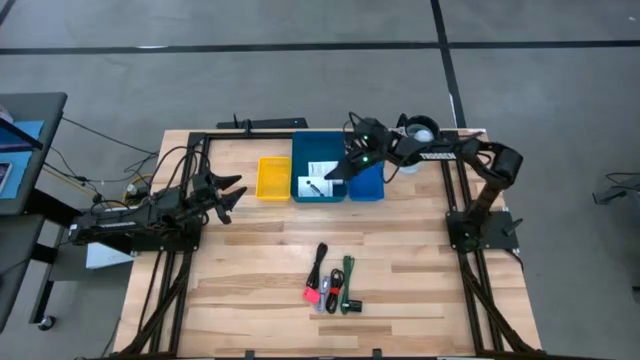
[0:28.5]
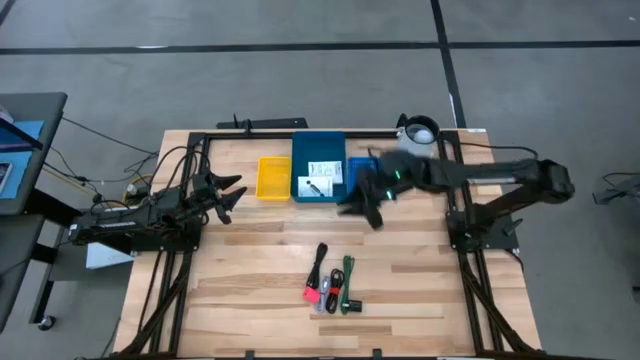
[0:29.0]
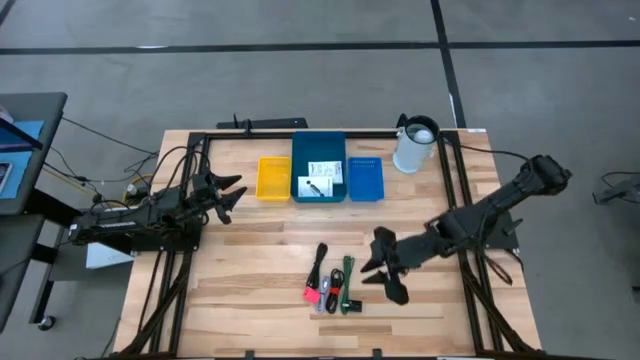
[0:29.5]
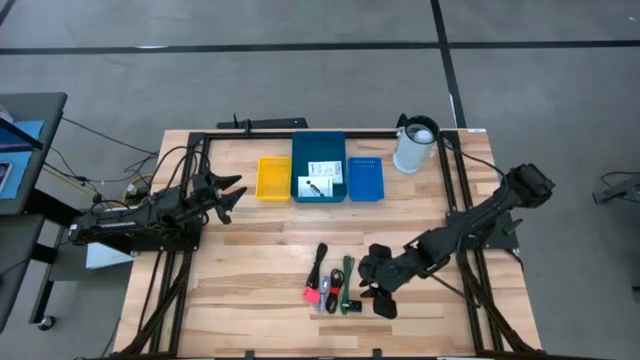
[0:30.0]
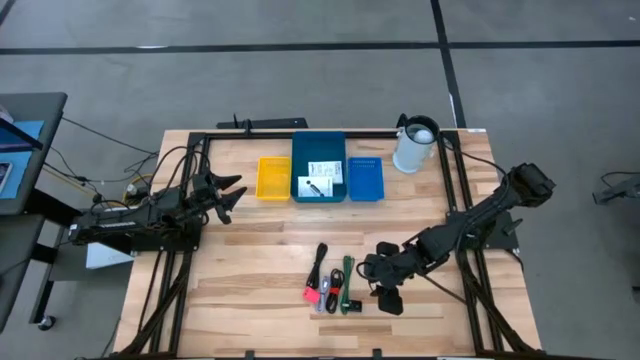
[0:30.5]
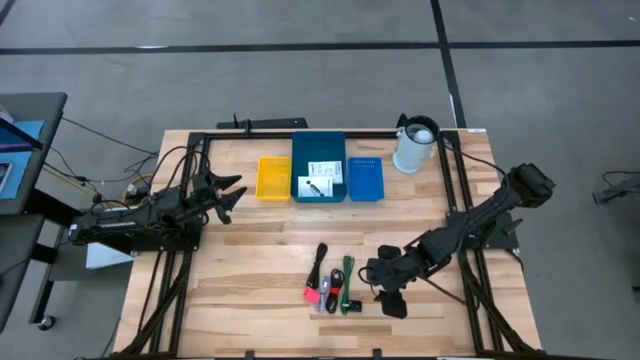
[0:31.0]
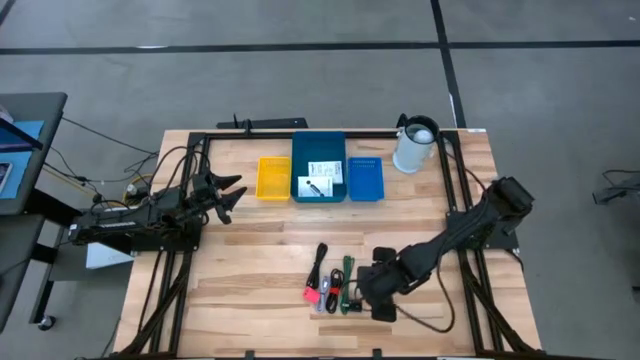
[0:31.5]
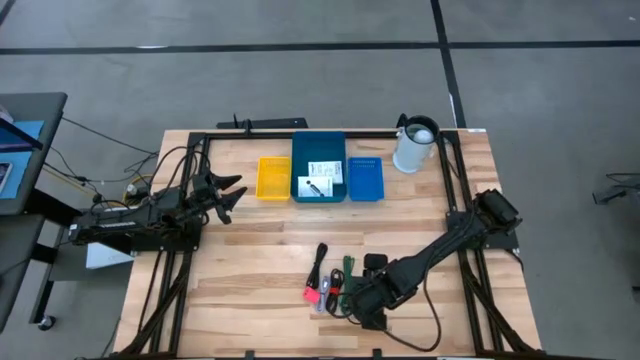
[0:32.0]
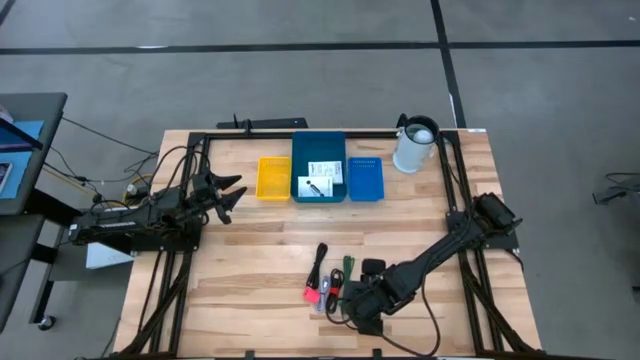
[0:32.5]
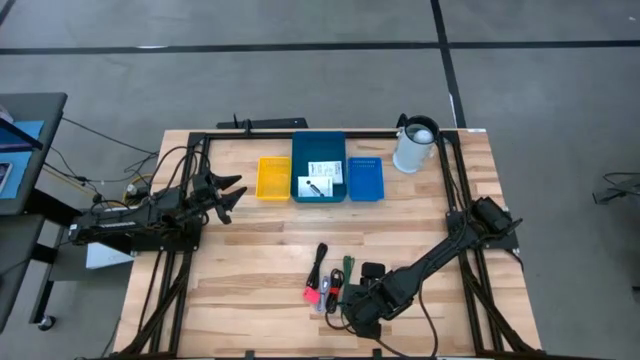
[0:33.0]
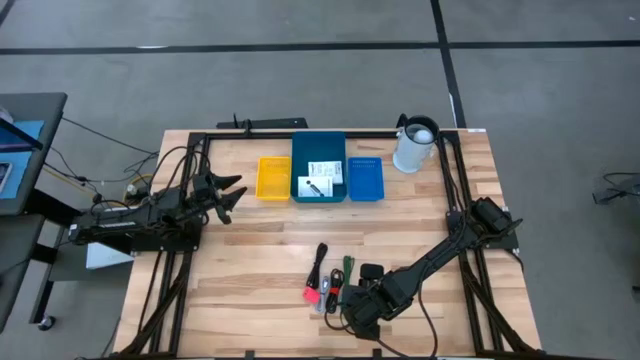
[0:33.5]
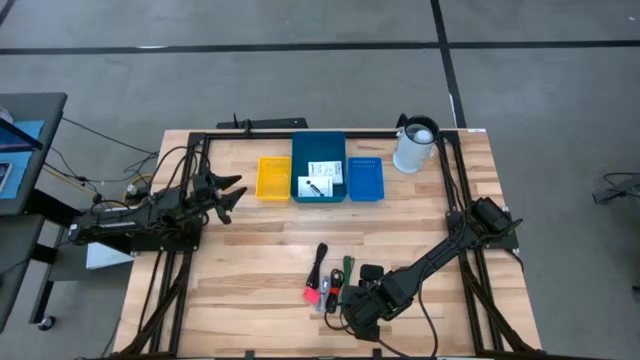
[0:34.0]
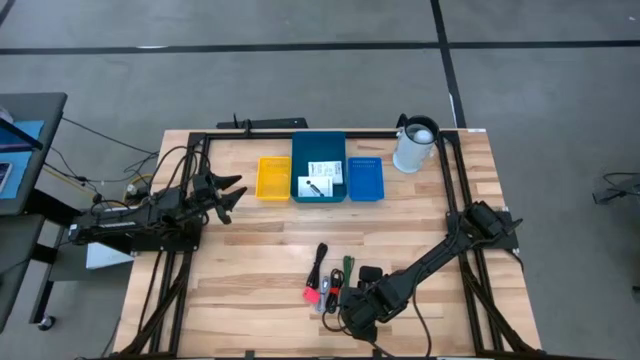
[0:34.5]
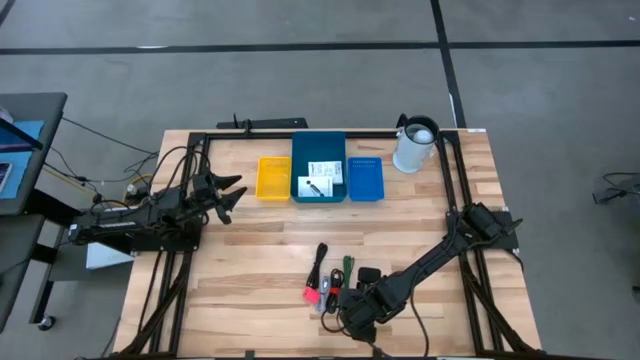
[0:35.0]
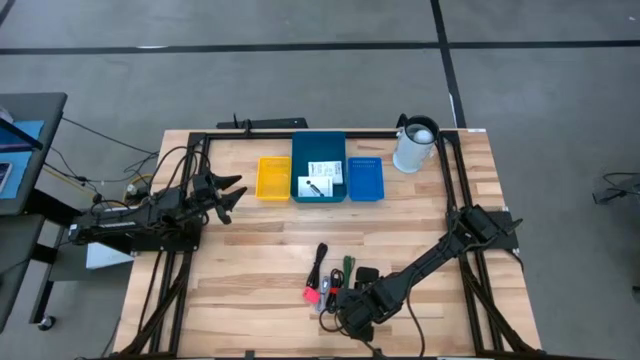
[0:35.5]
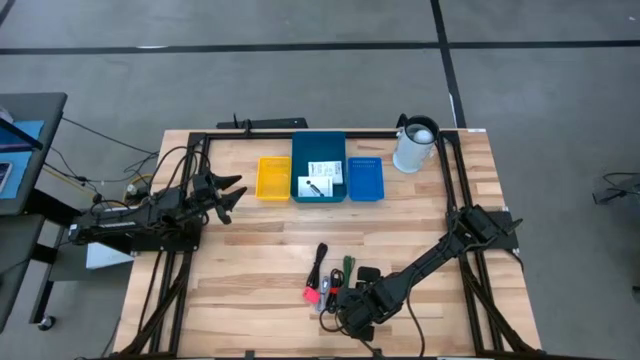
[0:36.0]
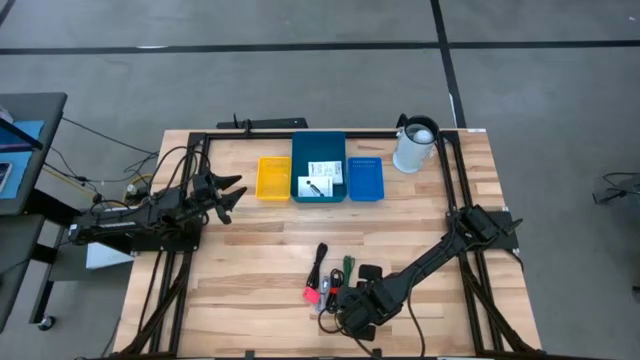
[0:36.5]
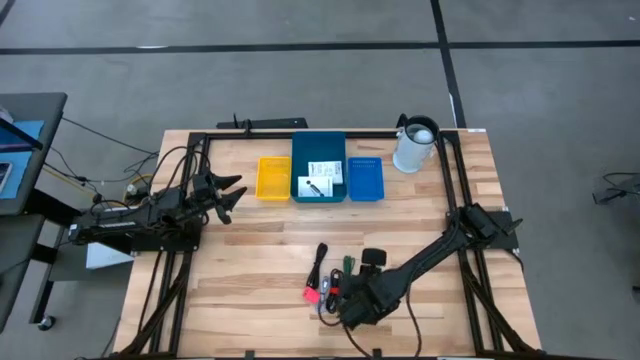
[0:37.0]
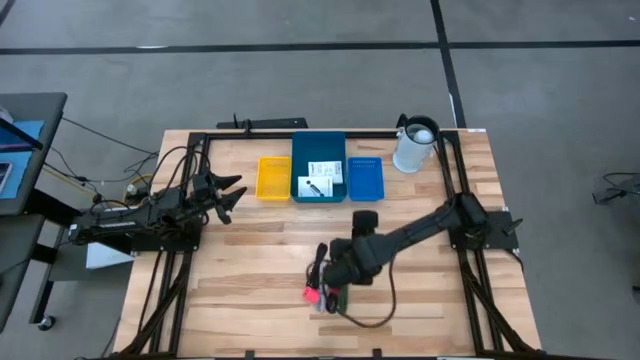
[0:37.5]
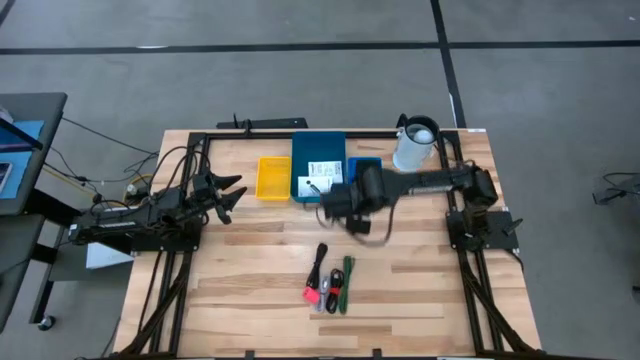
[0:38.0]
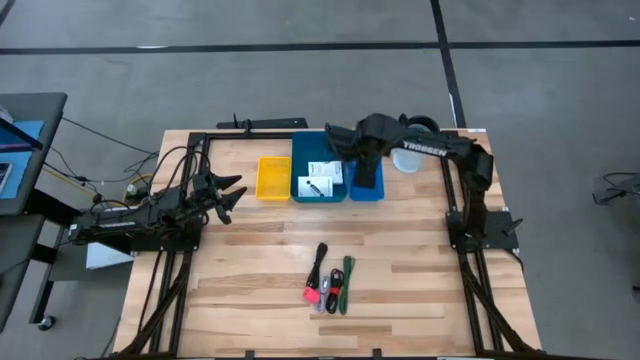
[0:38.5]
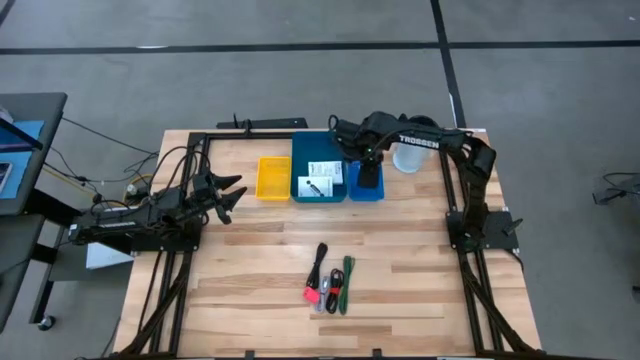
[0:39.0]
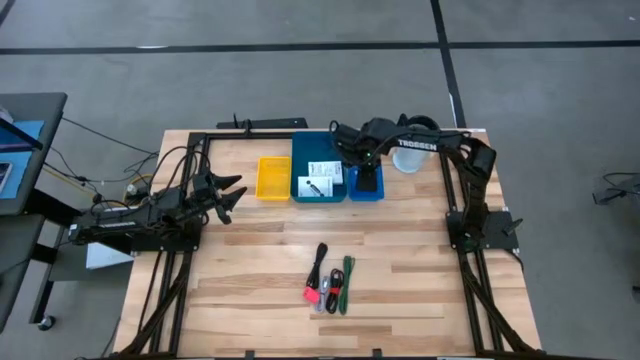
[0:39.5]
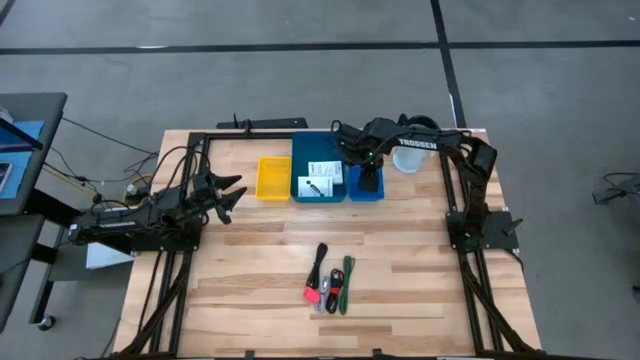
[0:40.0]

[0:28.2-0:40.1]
Task: Pick and place items into bin
Put the black charger adapter into the blue bin

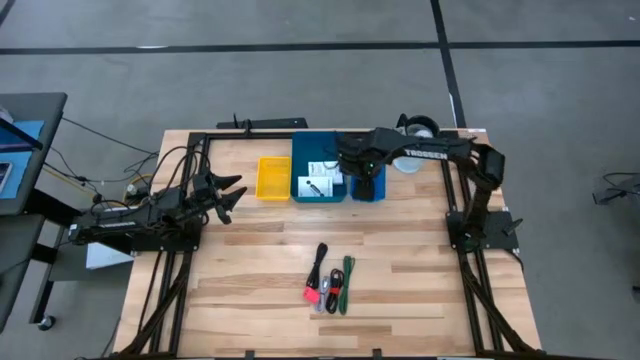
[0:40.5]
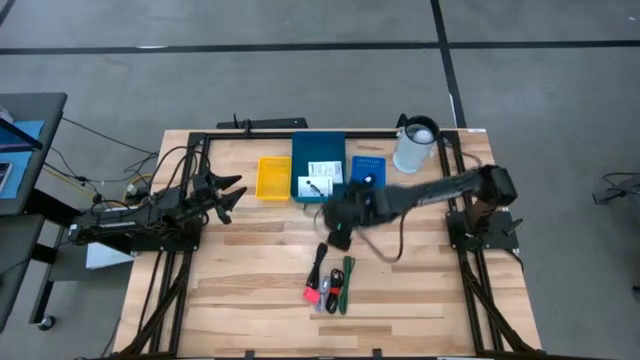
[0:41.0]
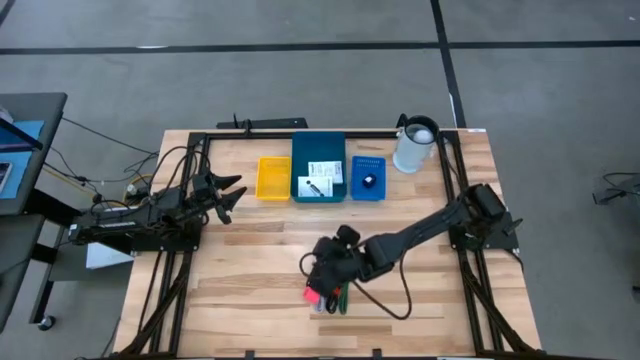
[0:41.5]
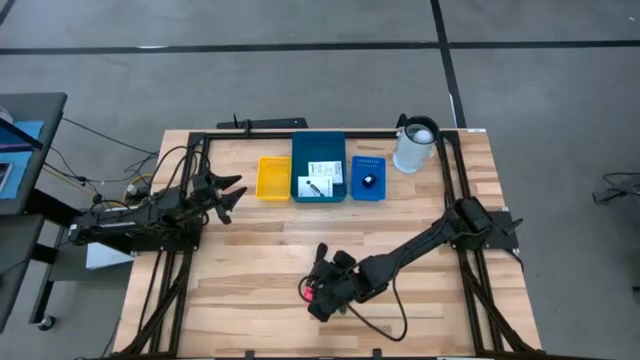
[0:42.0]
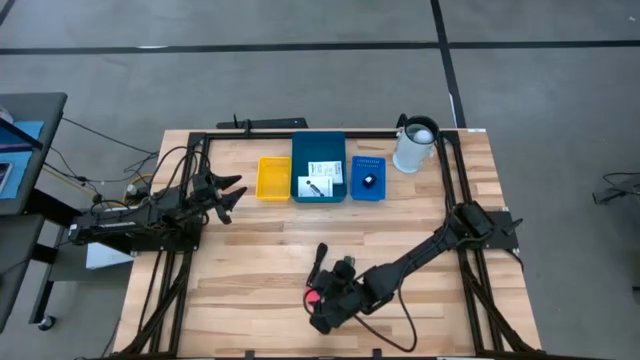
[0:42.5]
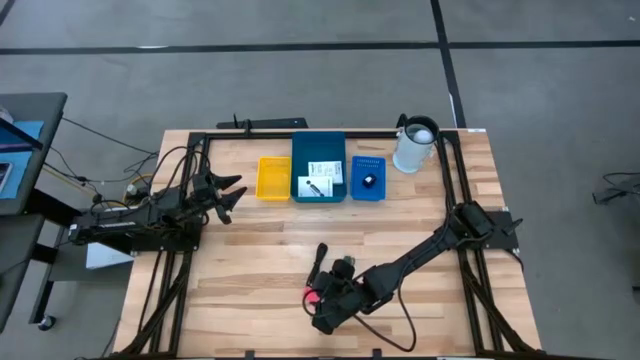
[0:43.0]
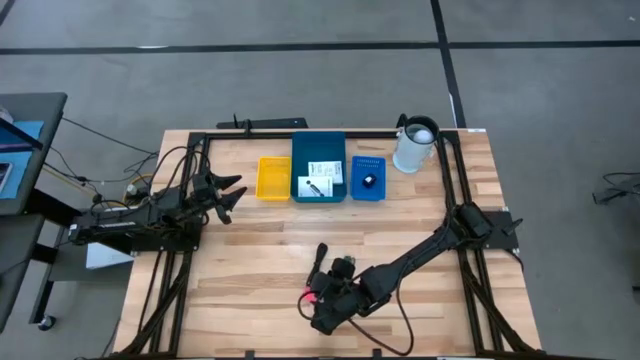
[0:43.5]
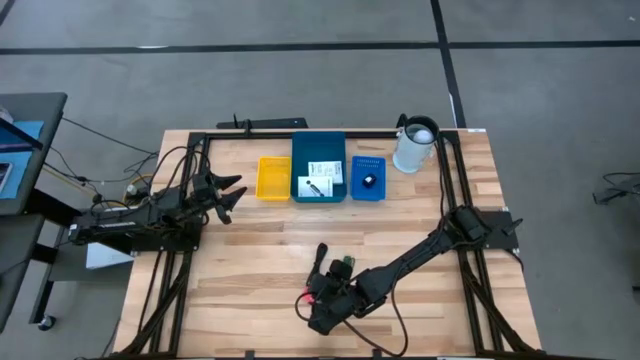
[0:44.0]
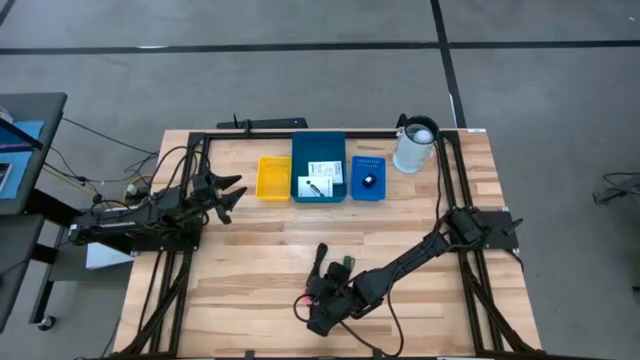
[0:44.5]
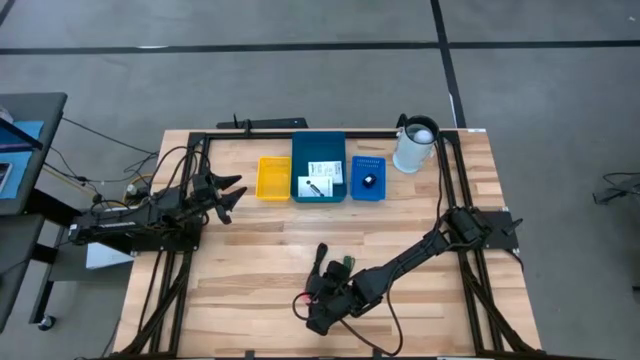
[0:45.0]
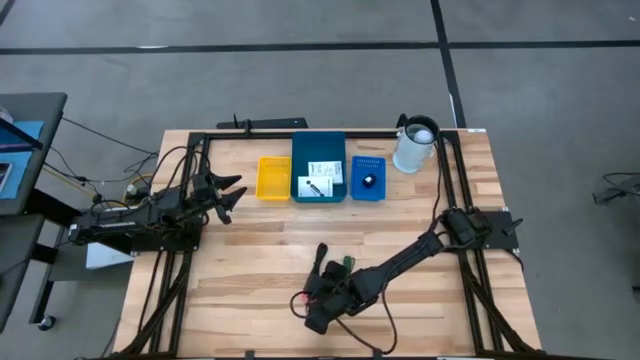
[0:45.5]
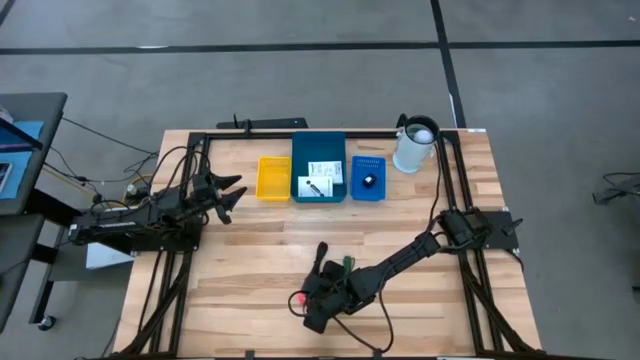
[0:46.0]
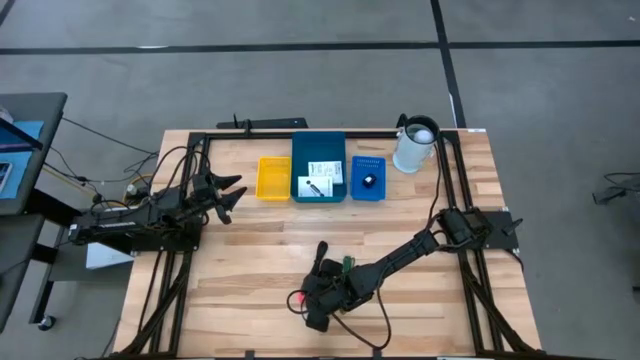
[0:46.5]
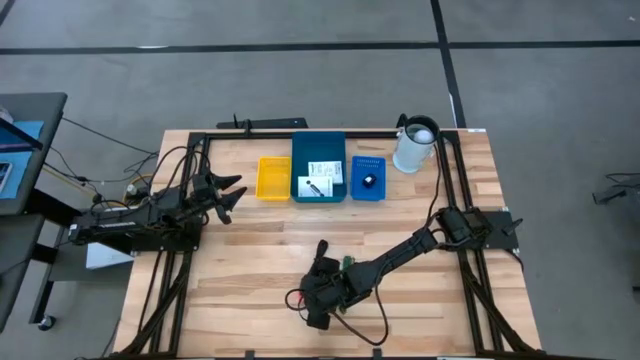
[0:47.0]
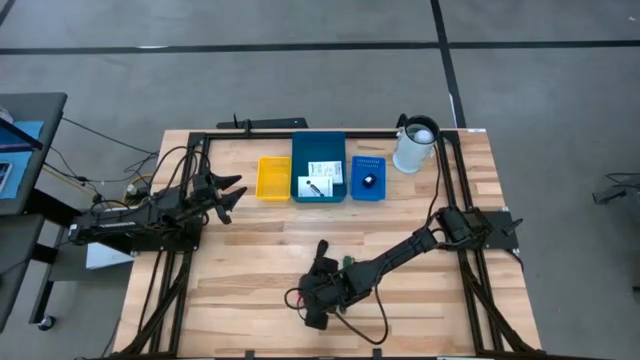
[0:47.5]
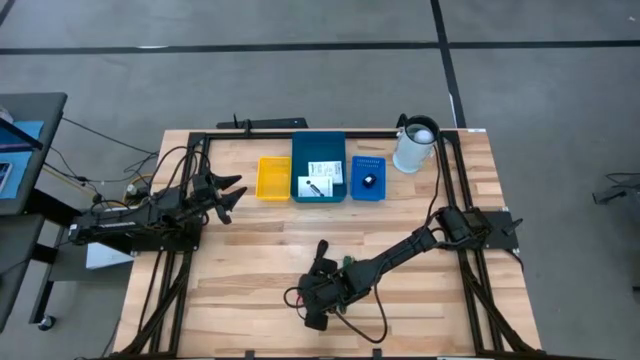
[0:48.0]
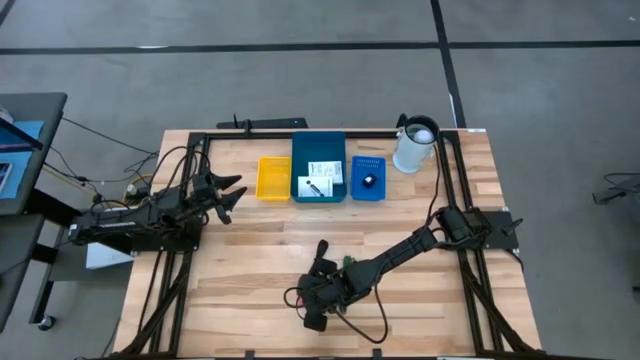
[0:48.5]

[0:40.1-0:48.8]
Put the pink charger adapter into the blue bin

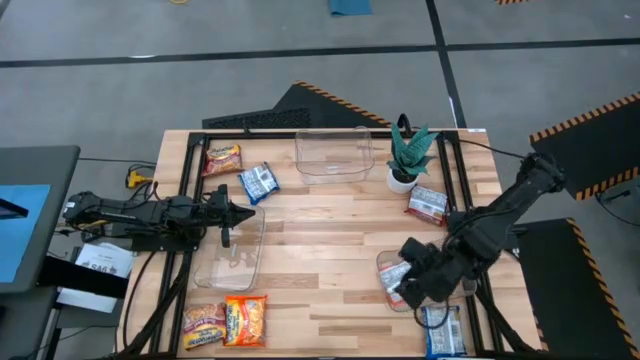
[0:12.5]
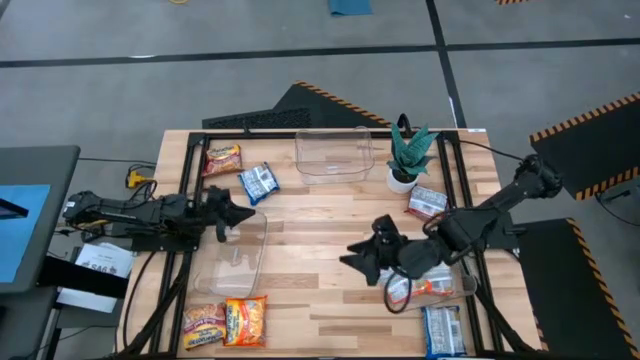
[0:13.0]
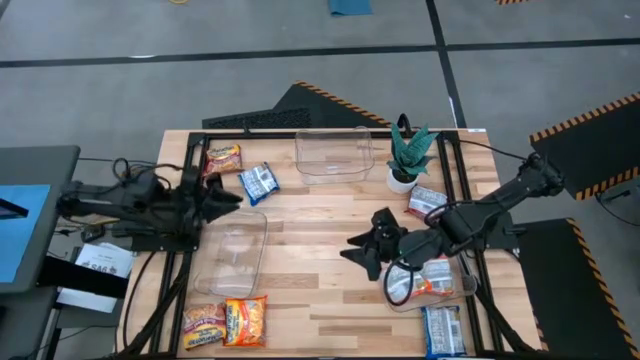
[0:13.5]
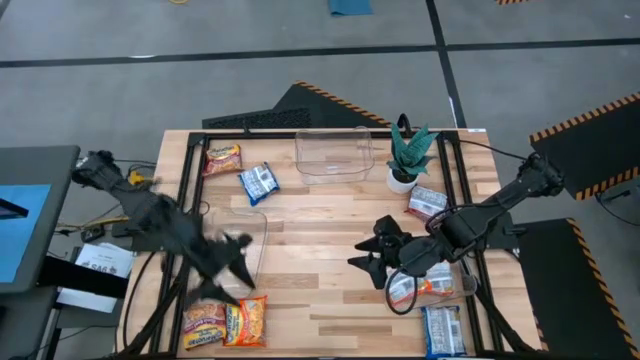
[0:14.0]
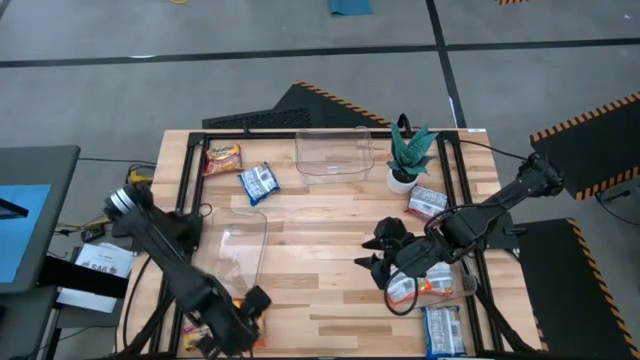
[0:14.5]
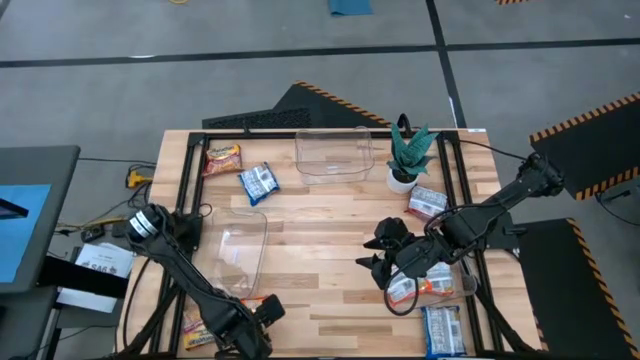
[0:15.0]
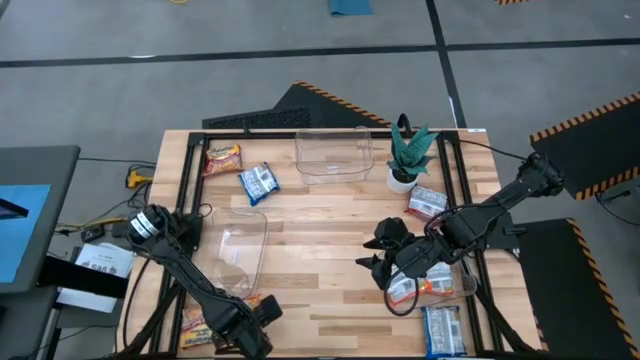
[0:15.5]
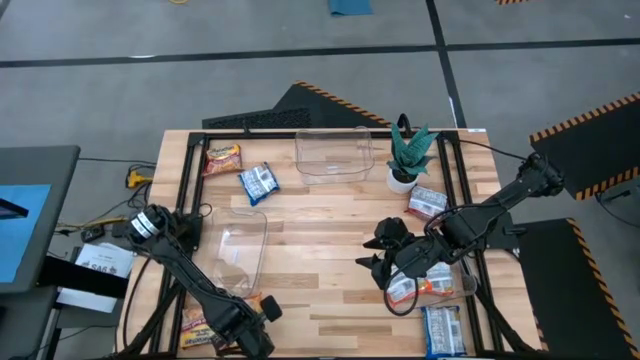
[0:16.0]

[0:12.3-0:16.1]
Task: Sort Maruchan noodles
Put the orange noodle pack into the bottom right transparent bin
